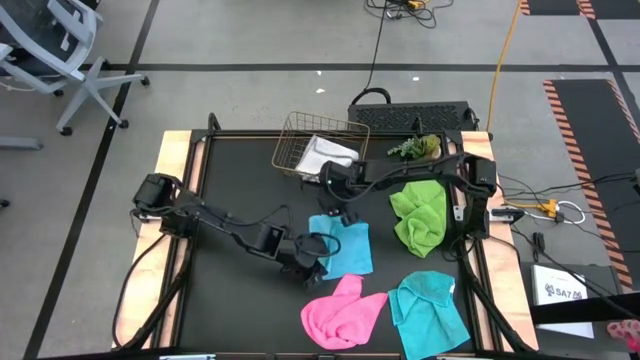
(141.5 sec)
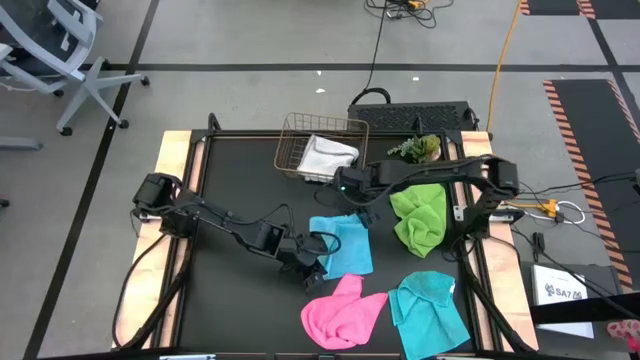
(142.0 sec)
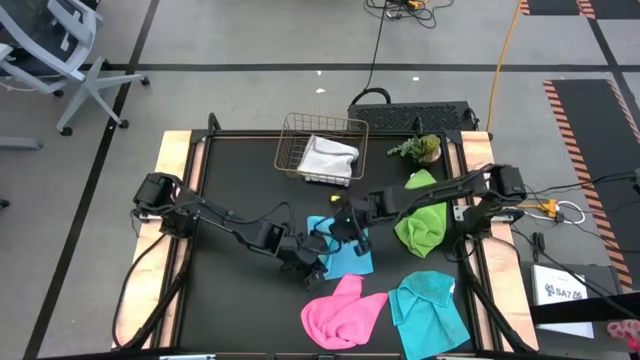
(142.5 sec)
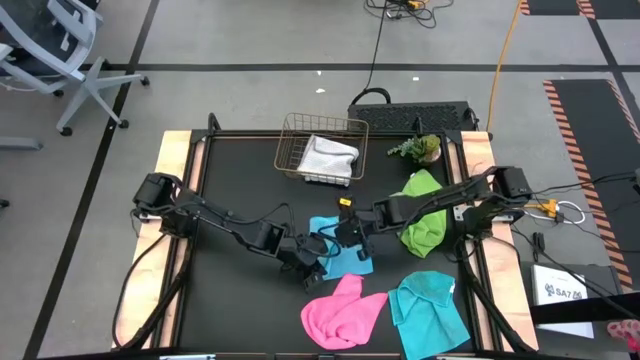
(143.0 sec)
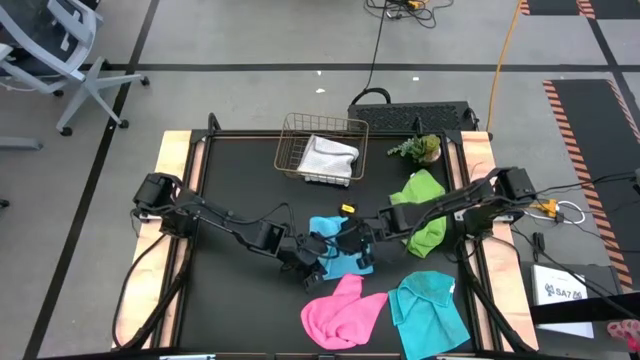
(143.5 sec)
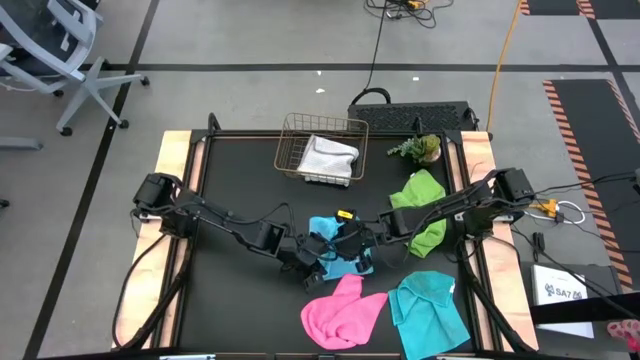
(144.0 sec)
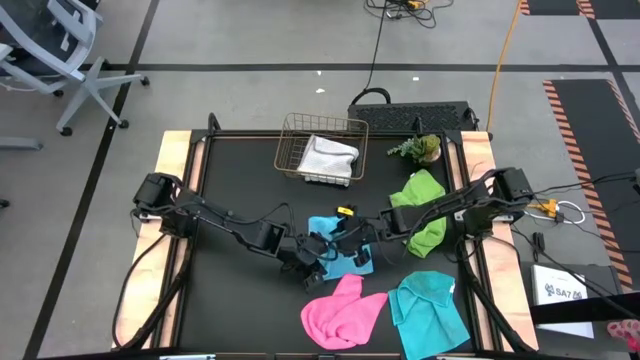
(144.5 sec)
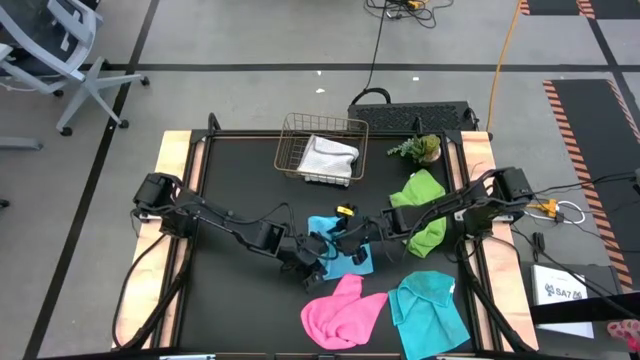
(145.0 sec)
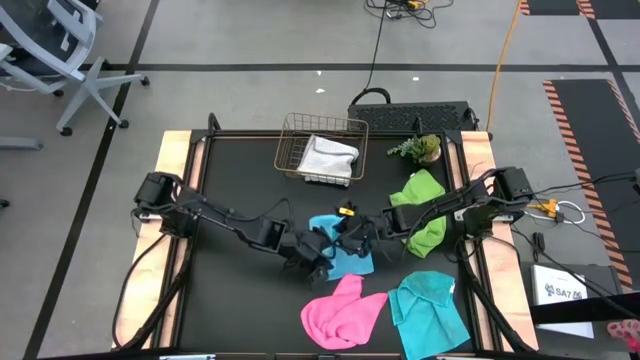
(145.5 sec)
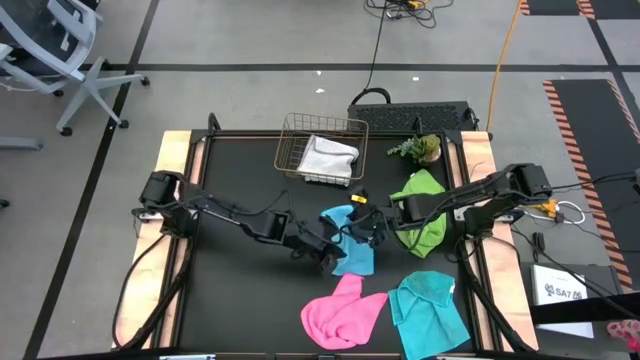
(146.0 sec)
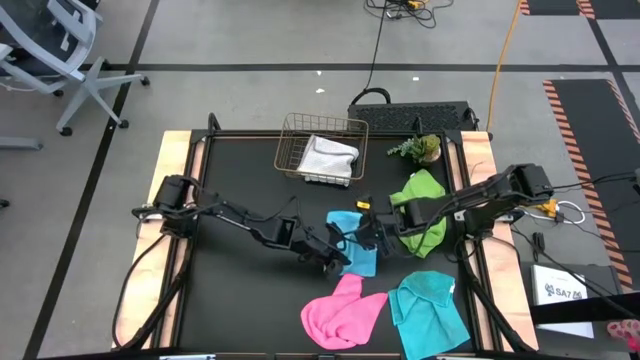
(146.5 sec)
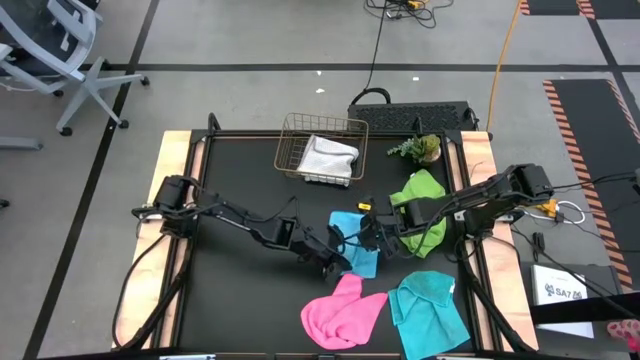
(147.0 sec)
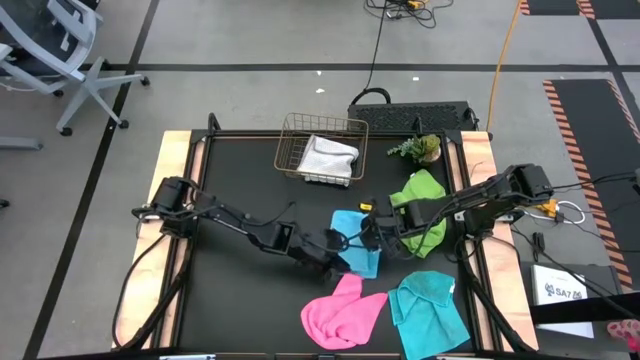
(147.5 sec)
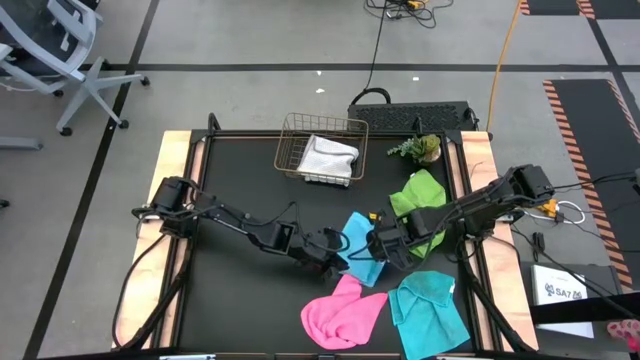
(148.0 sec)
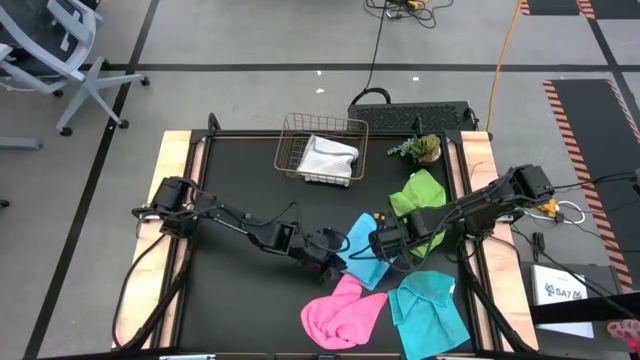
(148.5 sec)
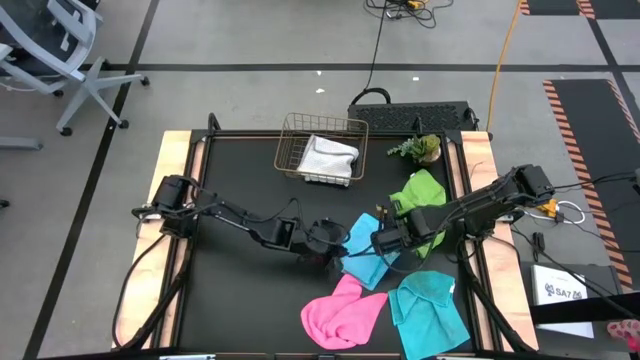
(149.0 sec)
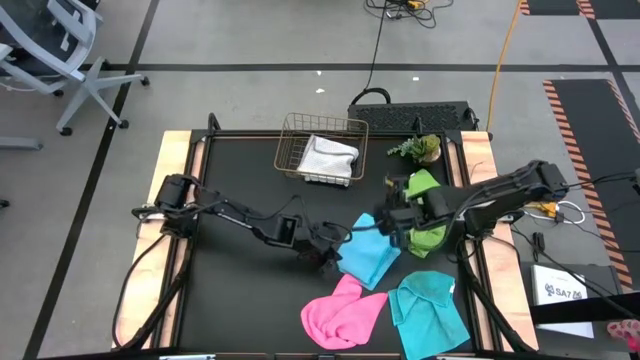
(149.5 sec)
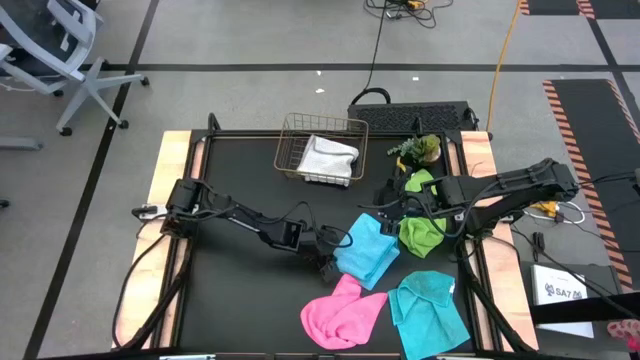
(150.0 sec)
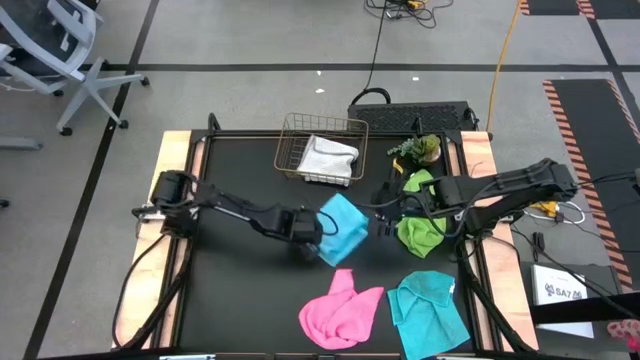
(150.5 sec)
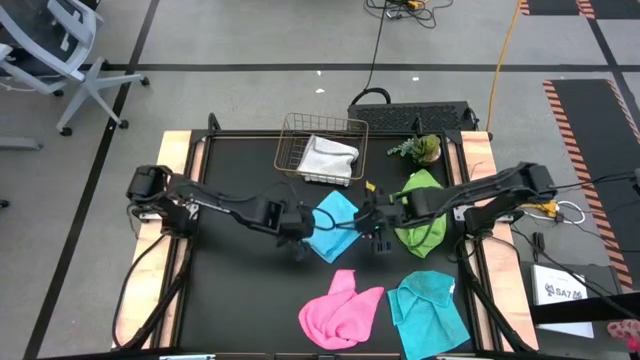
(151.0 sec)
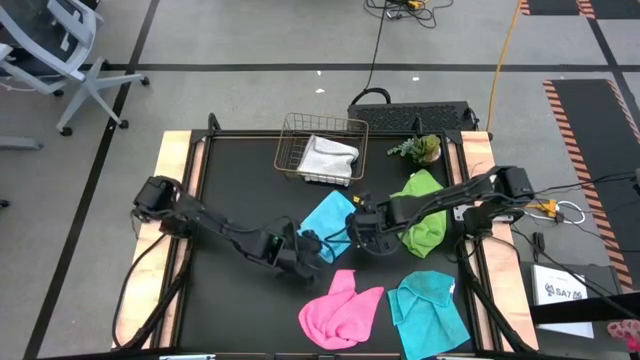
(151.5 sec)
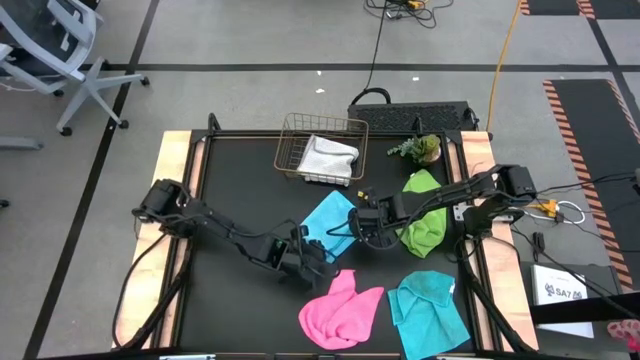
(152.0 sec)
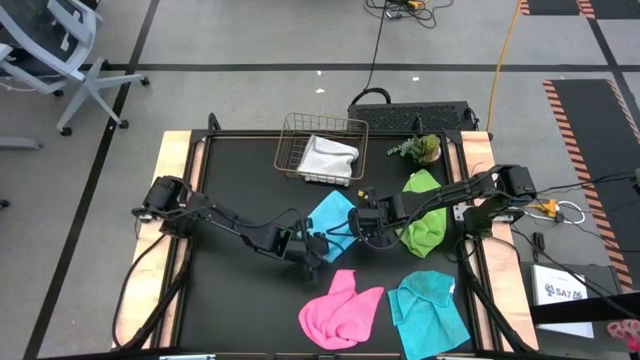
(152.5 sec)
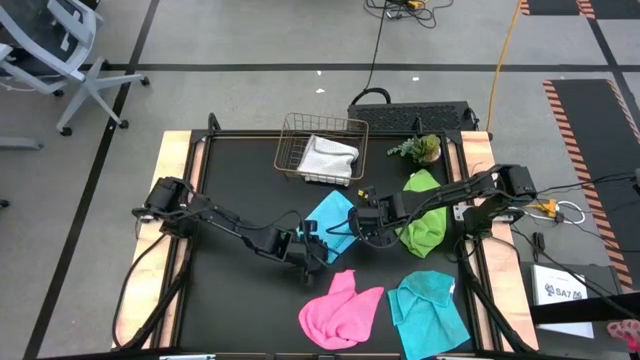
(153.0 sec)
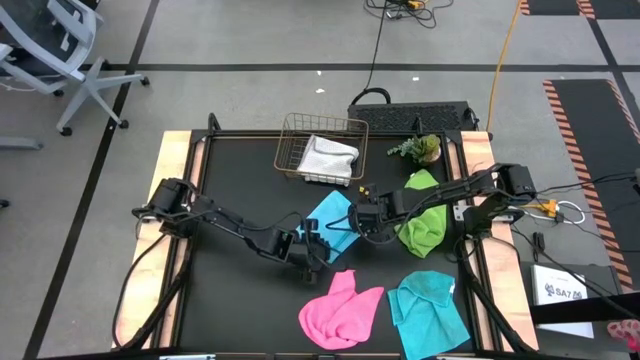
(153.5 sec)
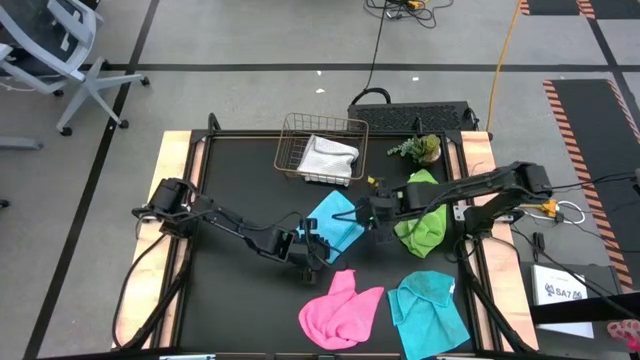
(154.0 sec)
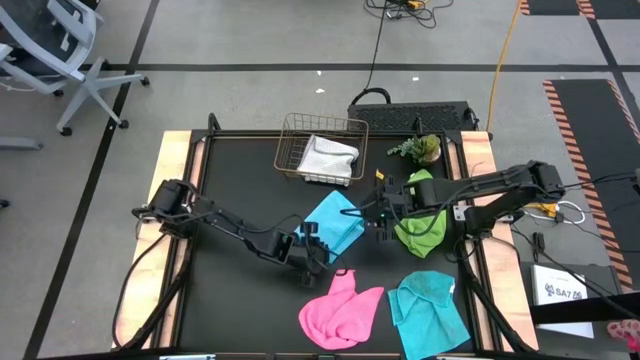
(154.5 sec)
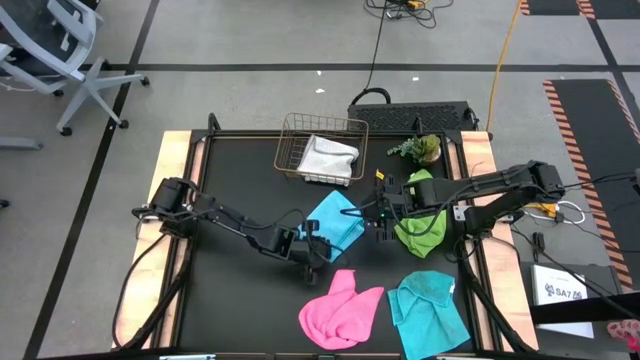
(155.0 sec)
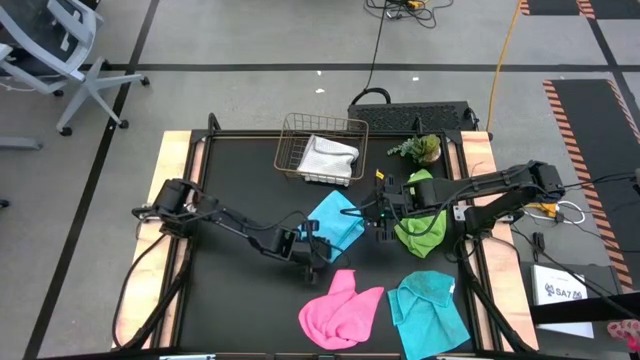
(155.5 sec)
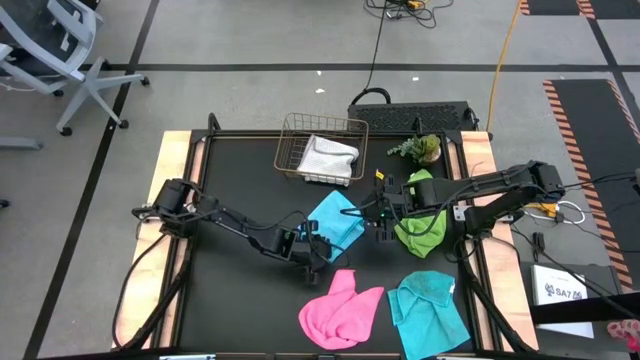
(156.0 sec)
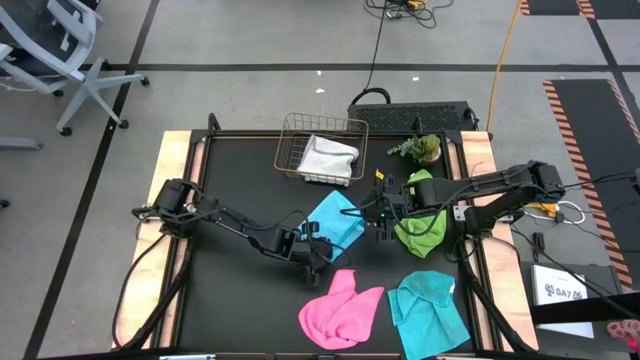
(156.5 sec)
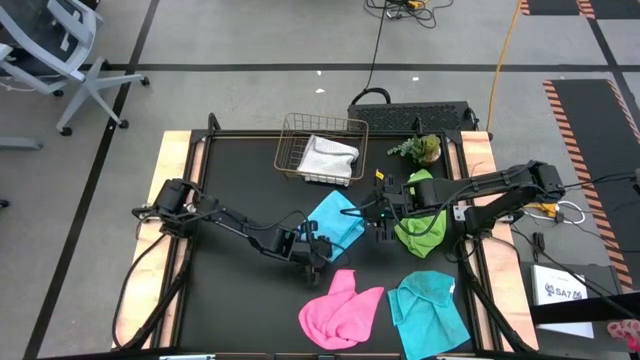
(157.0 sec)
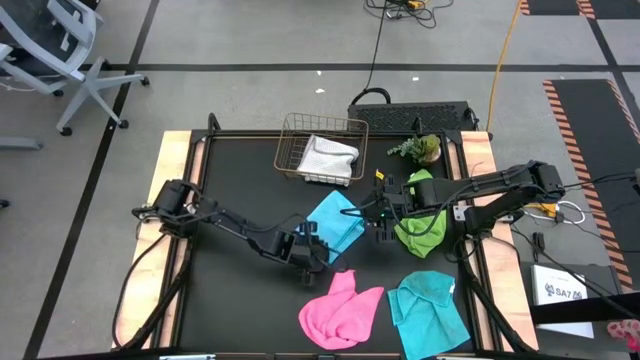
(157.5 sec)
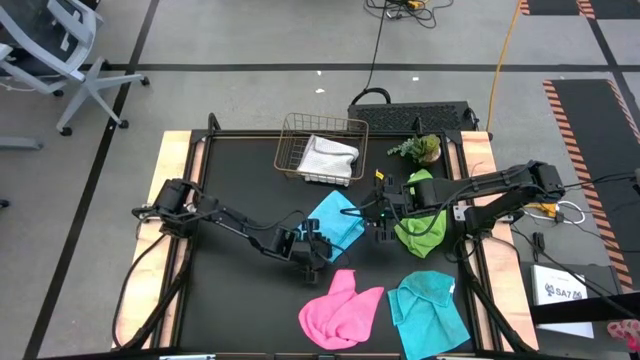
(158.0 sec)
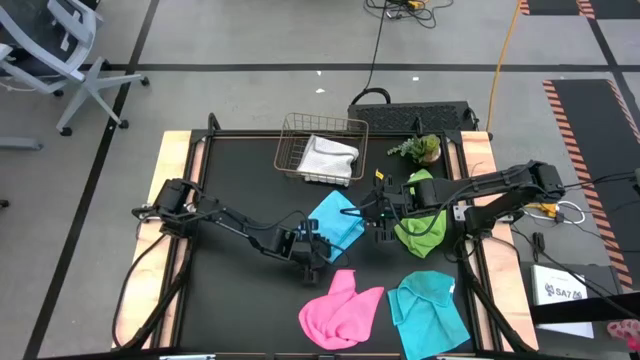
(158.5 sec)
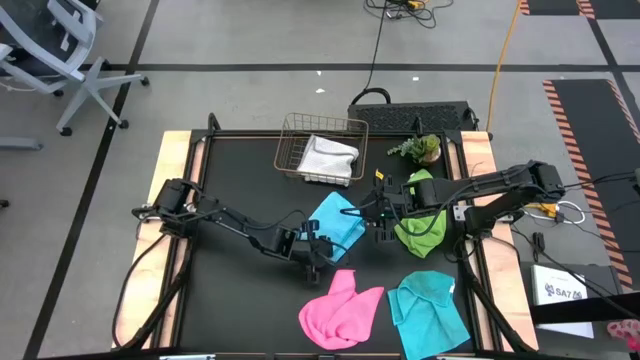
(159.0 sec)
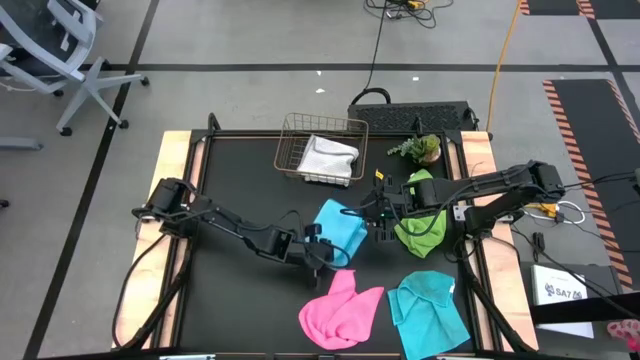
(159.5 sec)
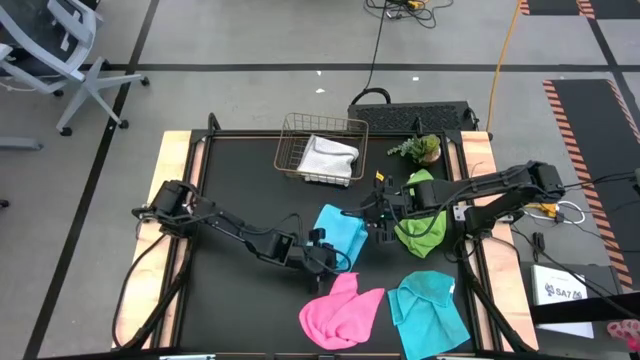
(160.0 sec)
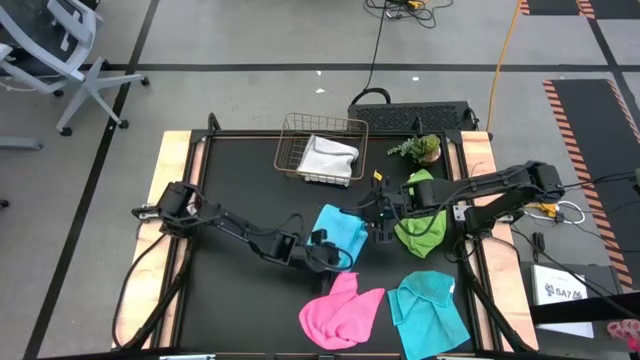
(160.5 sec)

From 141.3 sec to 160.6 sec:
Task: Fold microfiber towels
Fold the top blue microfiber cloth
